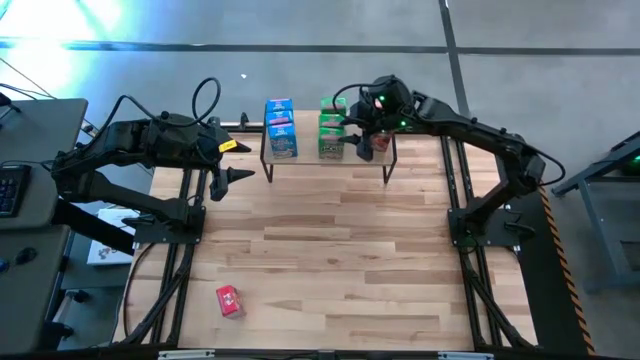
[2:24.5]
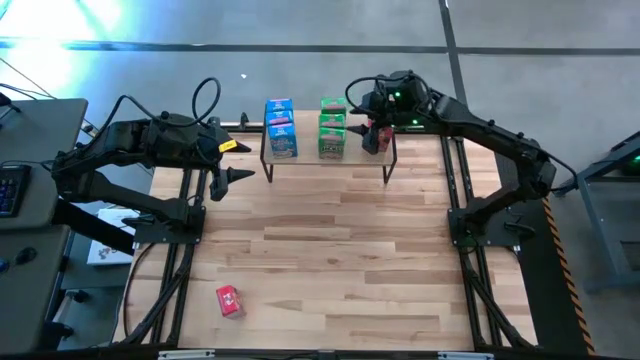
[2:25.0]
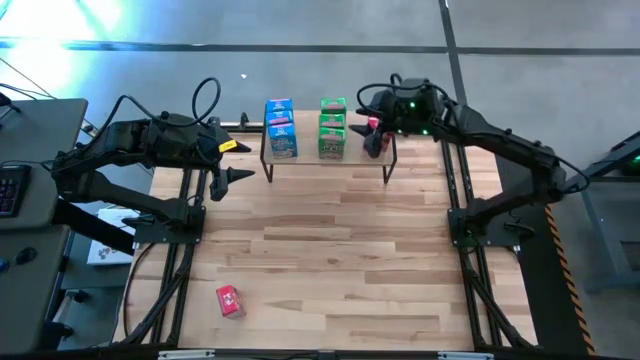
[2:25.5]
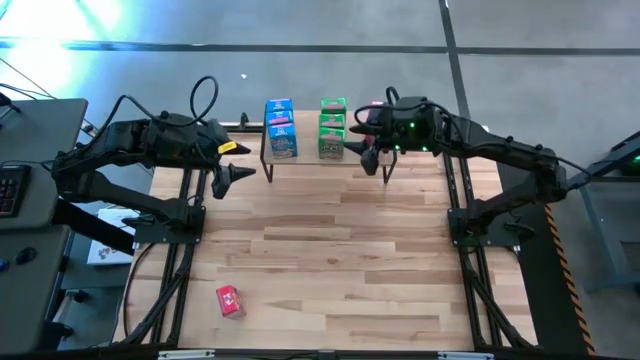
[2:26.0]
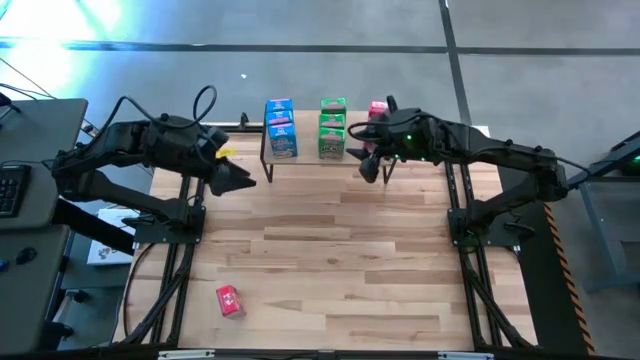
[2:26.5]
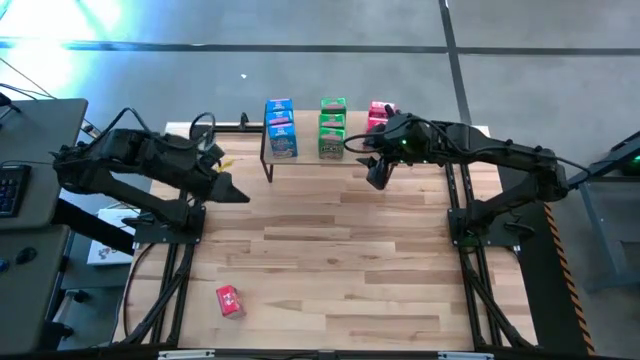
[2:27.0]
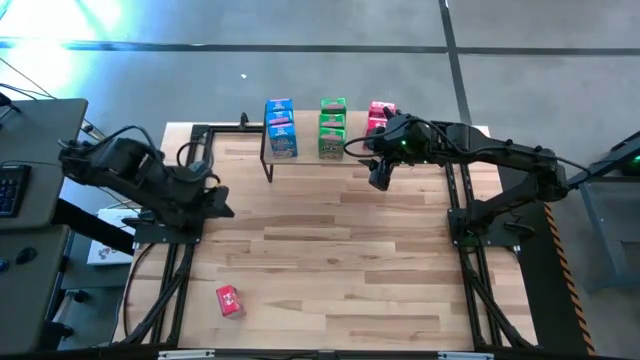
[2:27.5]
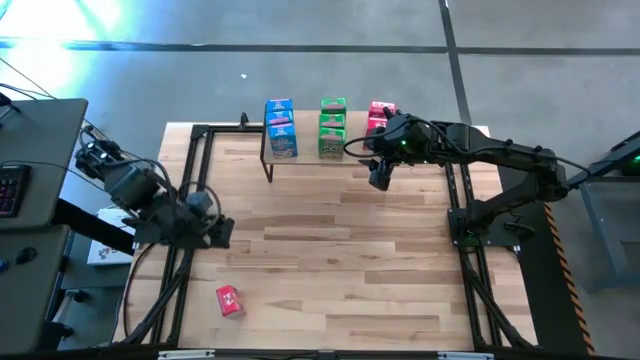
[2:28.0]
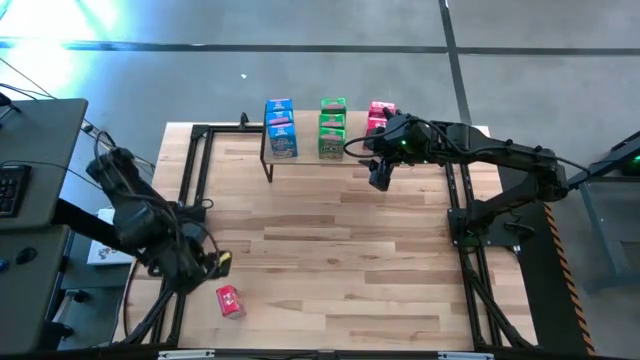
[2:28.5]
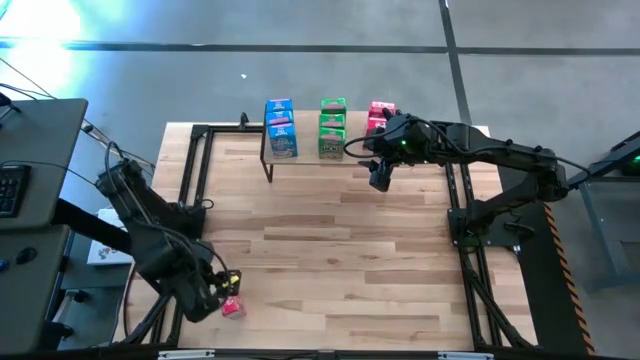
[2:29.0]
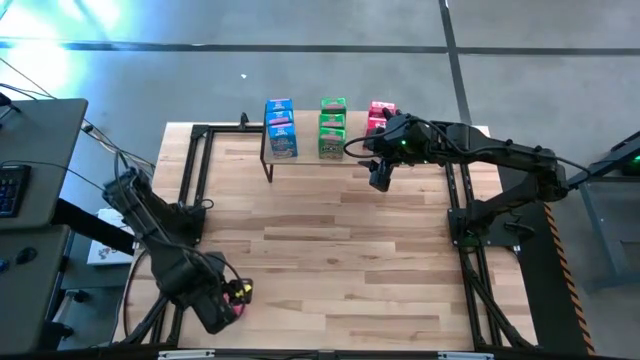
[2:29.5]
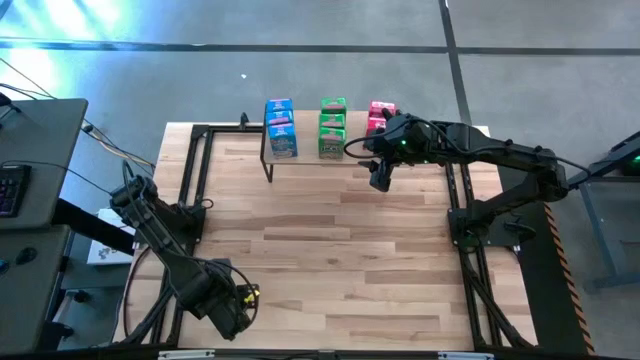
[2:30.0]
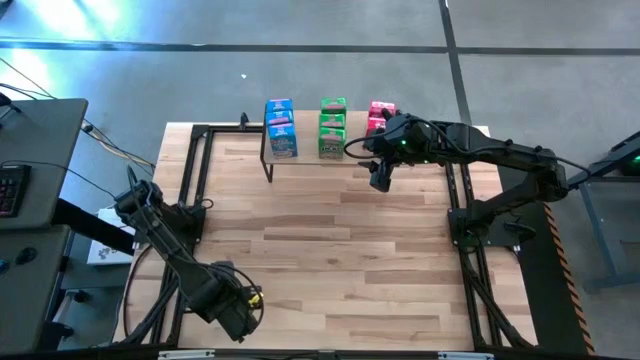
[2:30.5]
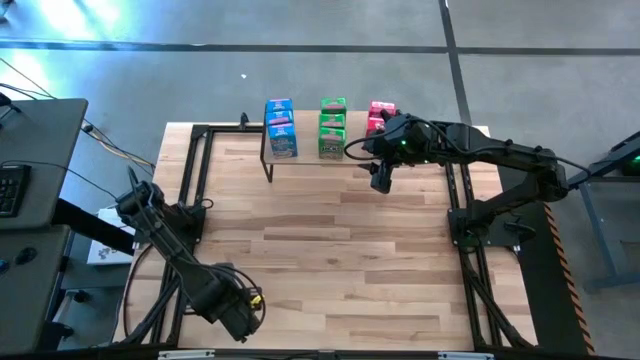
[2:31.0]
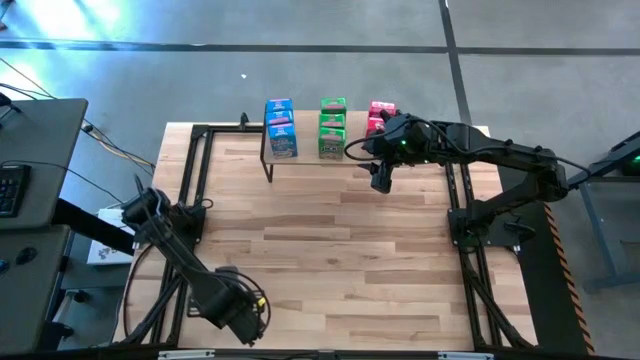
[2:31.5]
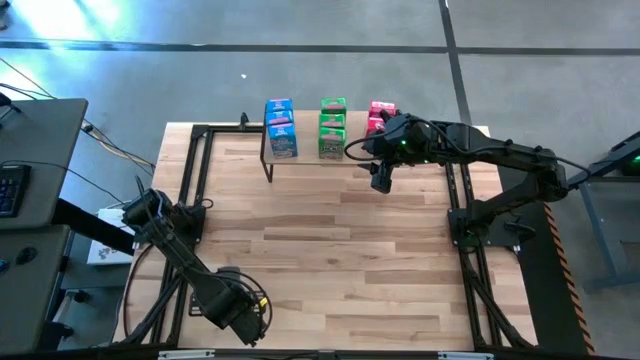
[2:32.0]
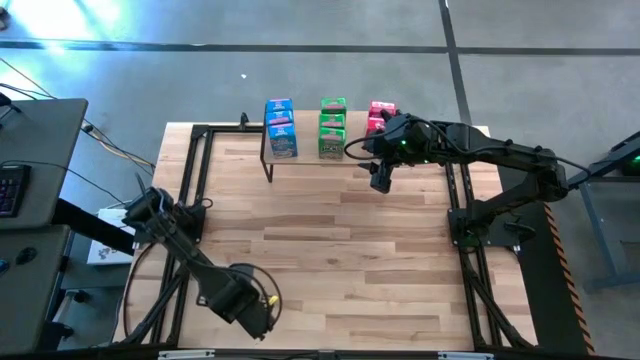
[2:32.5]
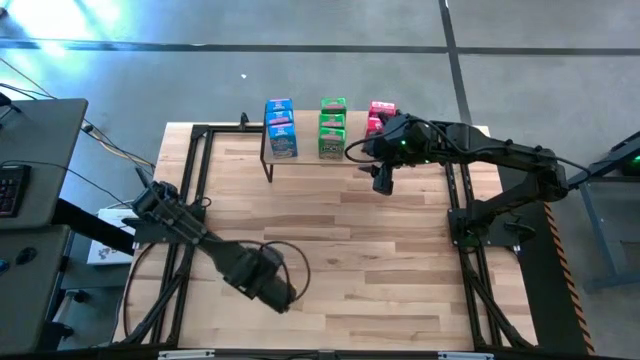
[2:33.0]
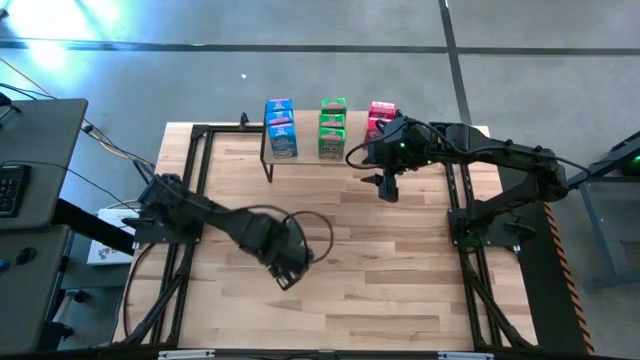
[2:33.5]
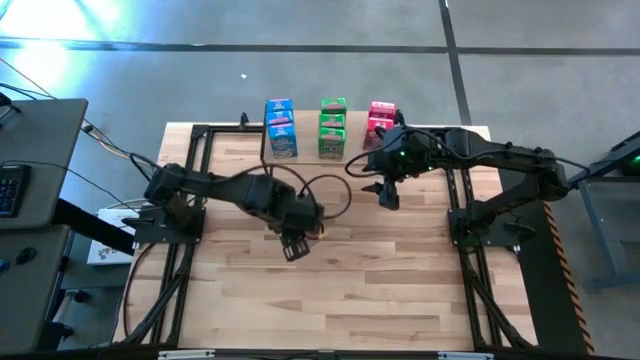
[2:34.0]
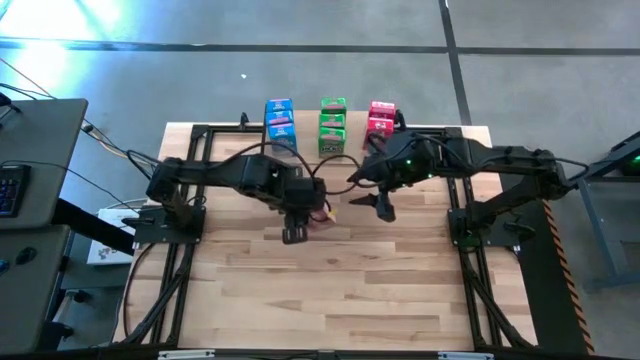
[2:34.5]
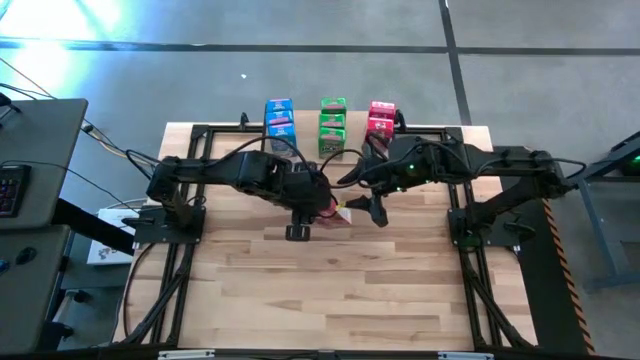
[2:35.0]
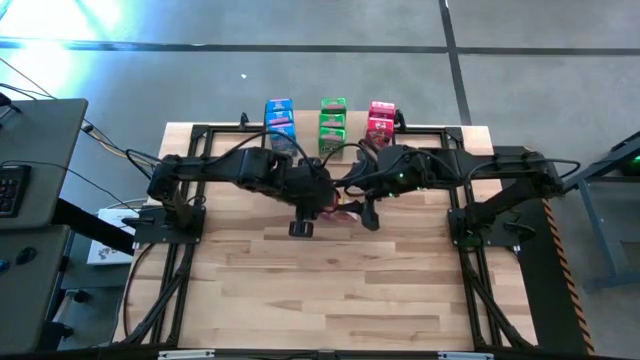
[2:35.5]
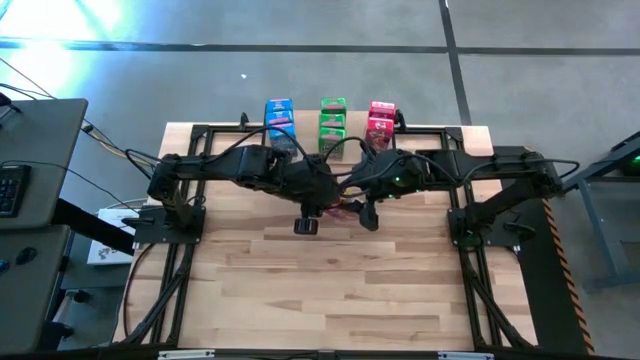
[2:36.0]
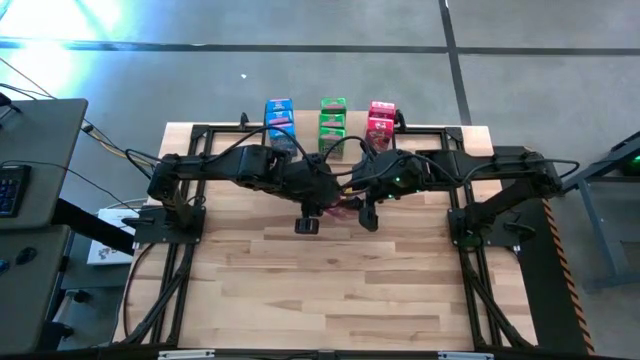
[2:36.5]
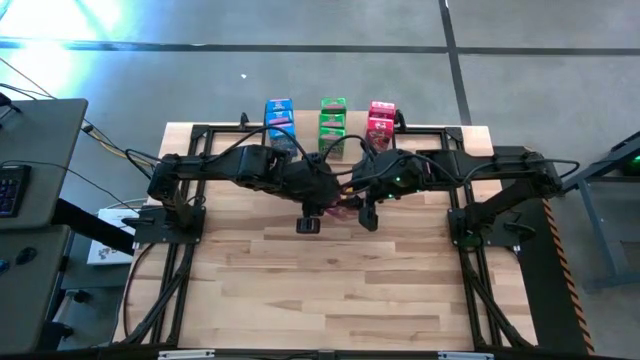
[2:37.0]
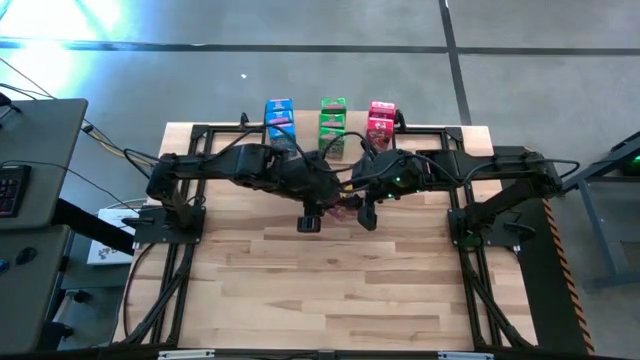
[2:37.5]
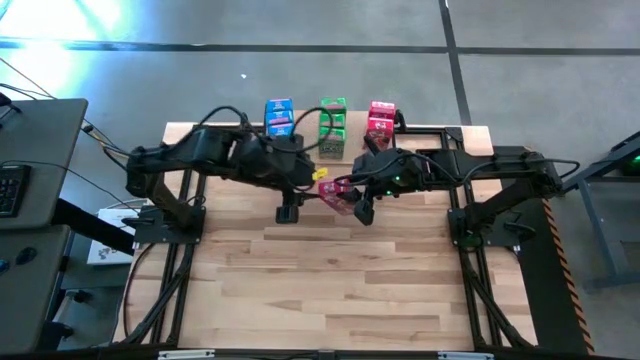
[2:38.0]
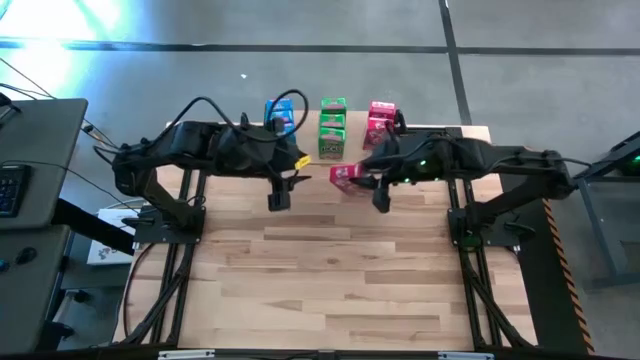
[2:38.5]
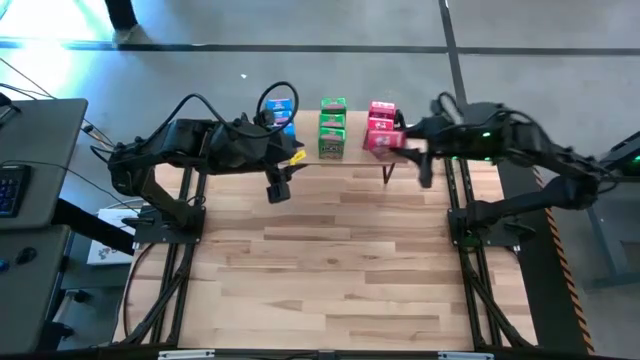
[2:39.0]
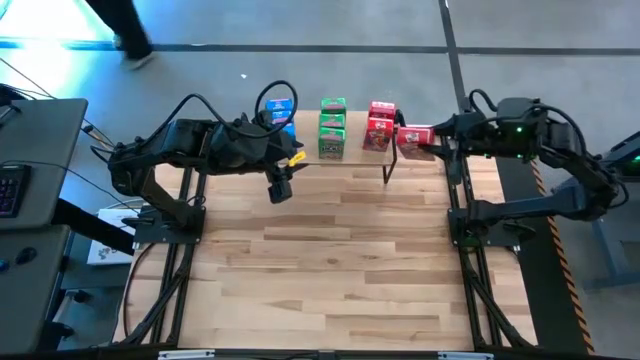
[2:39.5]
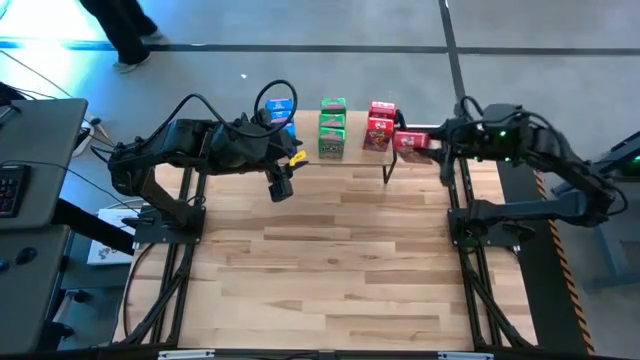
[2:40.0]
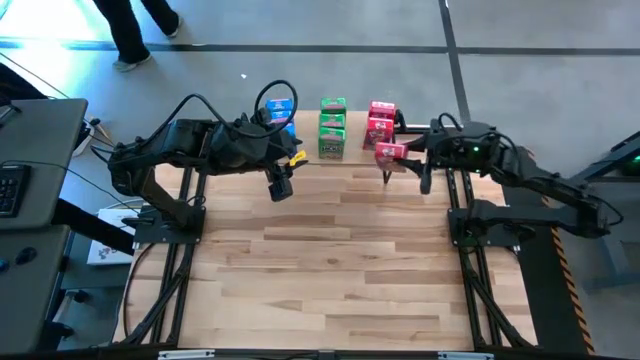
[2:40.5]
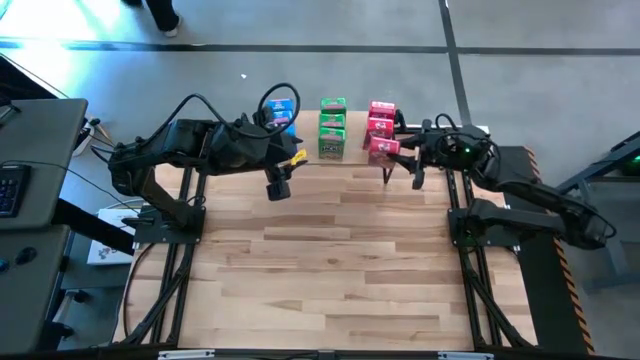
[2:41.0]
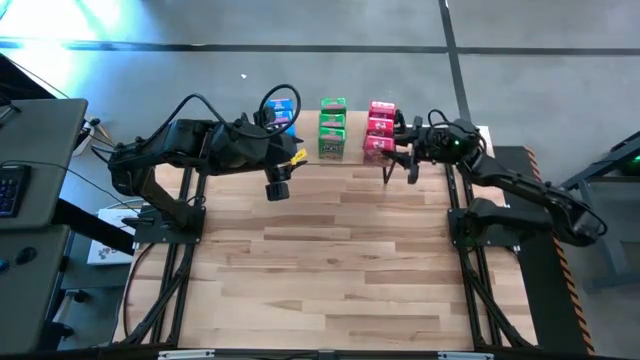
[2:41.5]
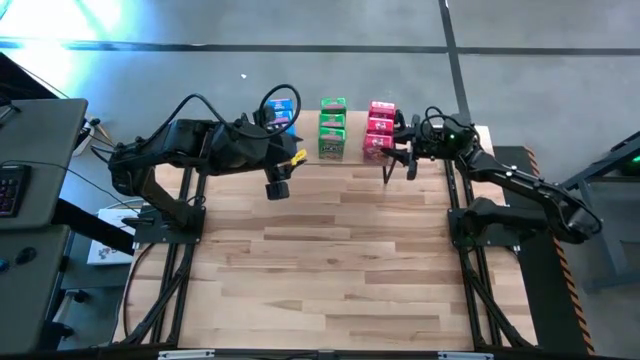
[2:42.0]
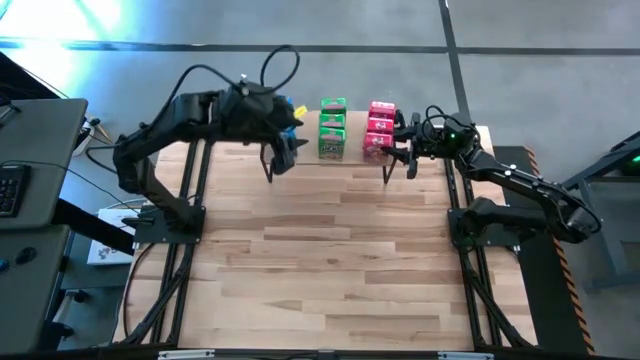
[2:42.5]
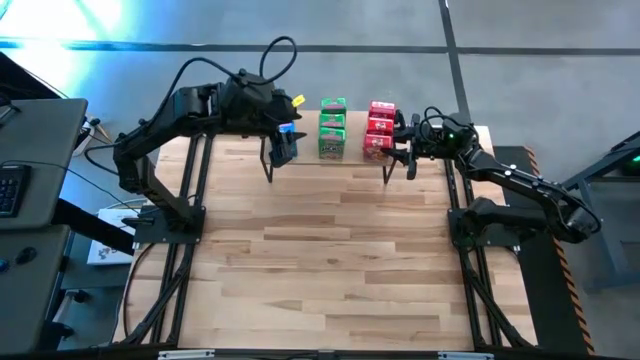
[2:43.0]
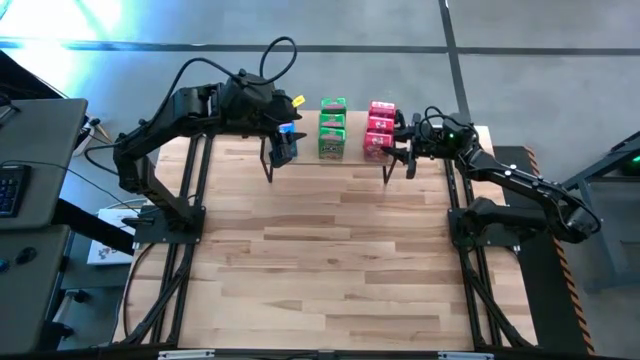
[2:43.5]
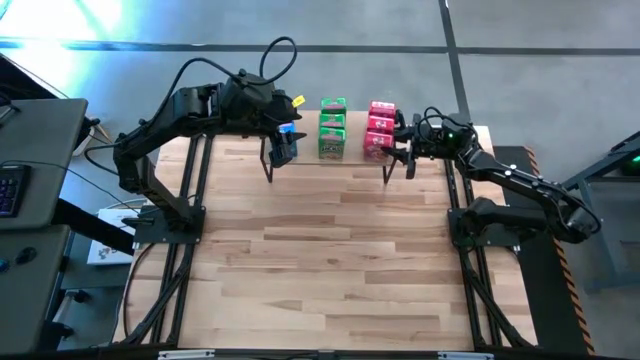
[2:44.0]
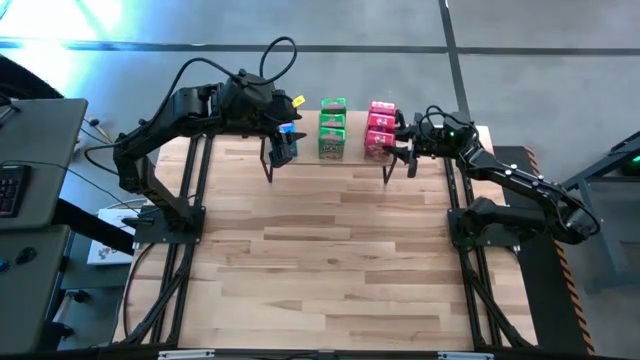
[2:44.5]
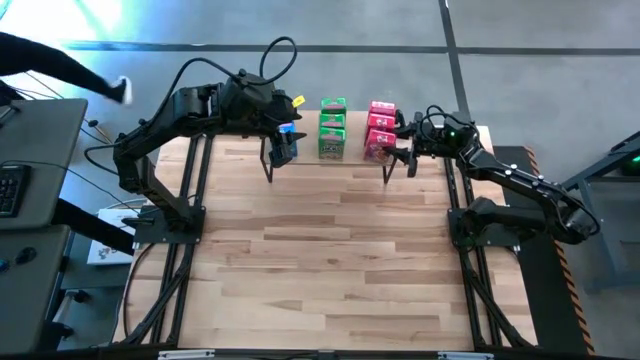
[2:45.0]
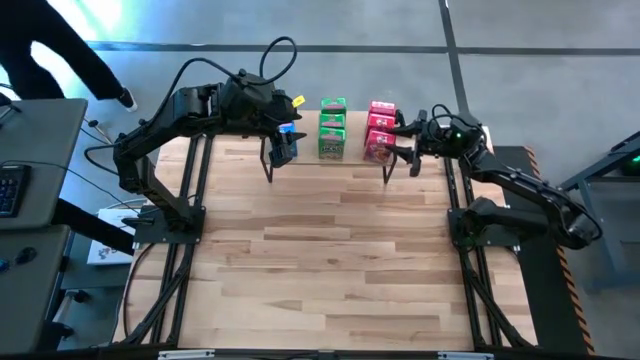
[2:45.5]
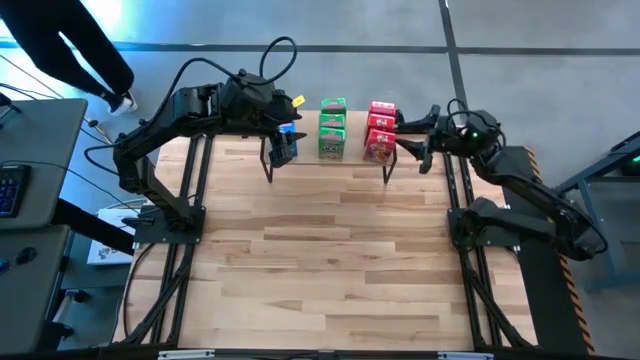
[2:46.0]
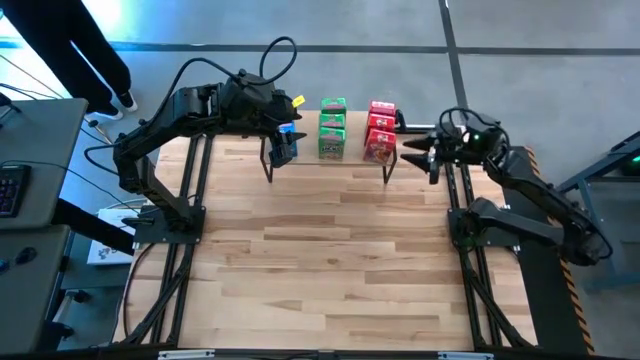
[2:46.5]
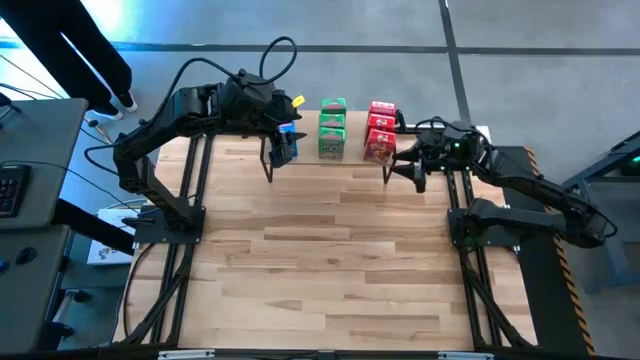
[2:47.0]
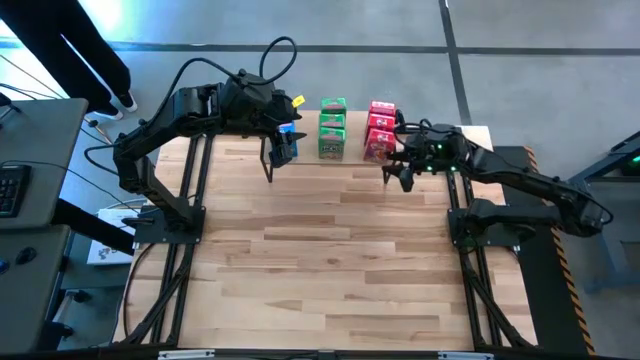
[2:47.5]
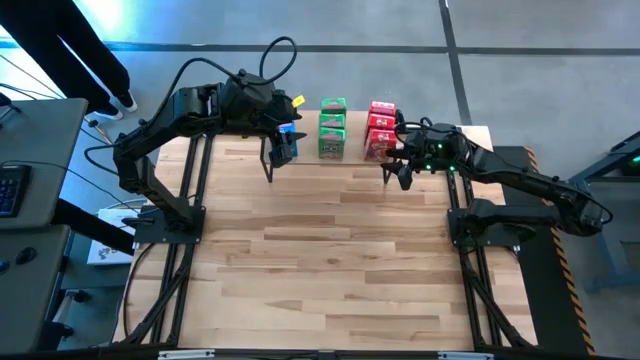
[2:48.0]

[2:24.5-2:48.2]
Task: Stack cereal on shelf
Put the red cereal box on the shelf aligned with the other red cereal boxes
